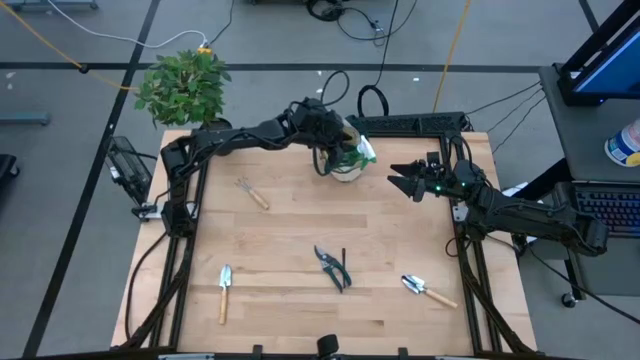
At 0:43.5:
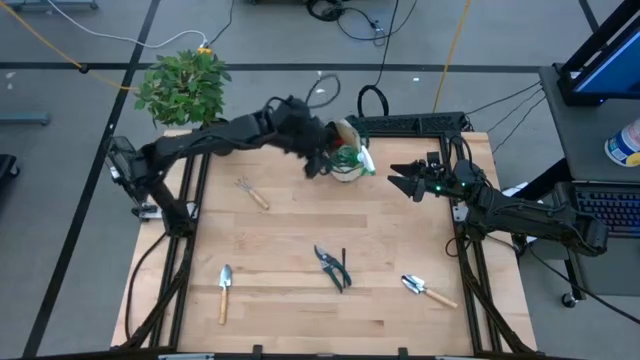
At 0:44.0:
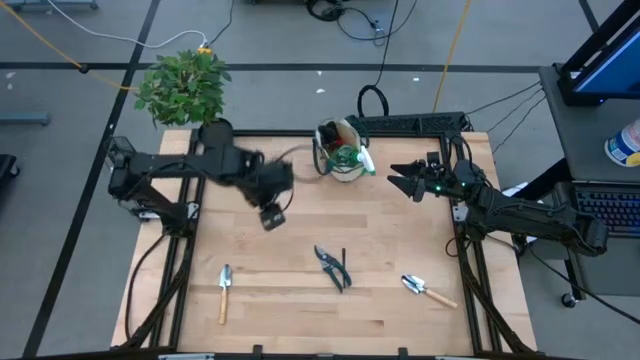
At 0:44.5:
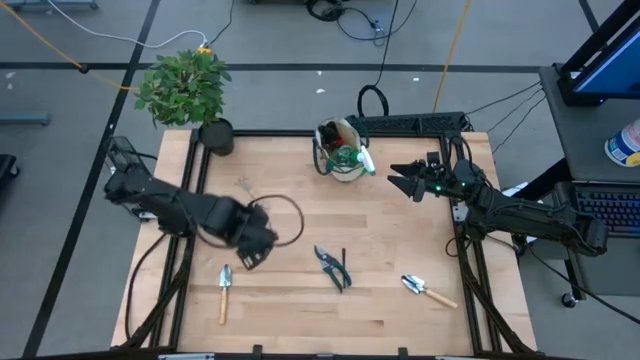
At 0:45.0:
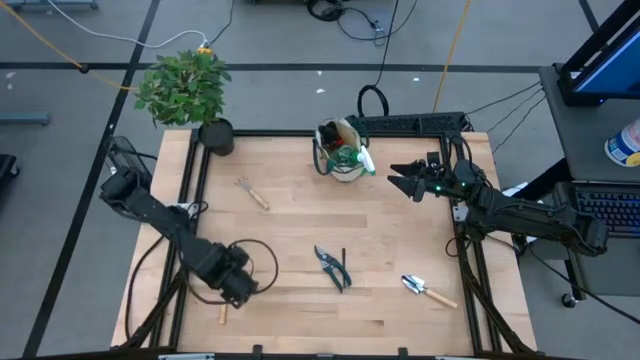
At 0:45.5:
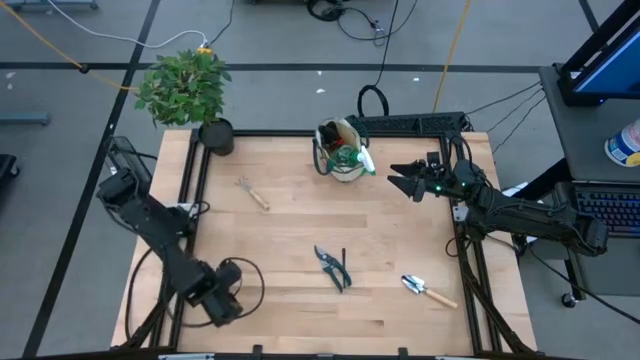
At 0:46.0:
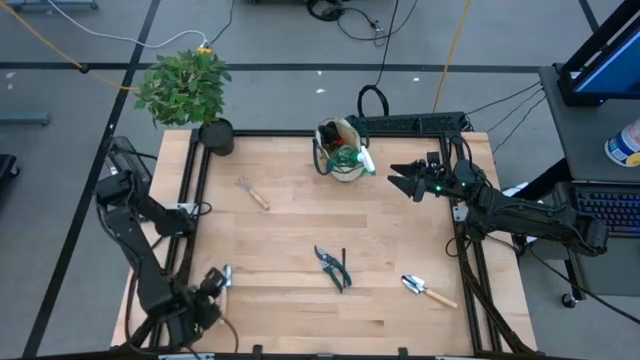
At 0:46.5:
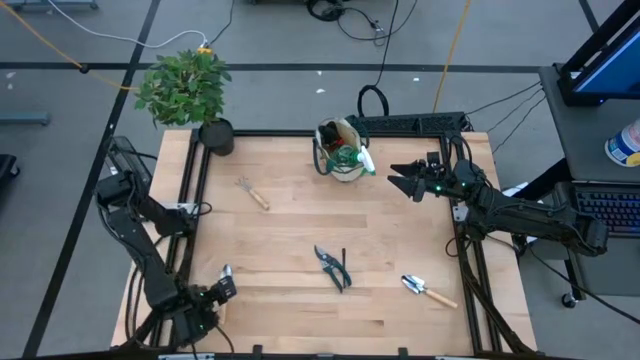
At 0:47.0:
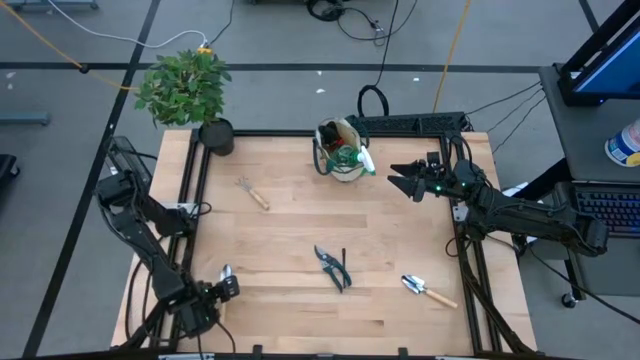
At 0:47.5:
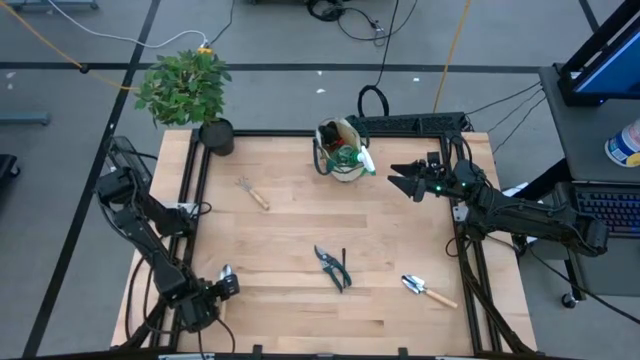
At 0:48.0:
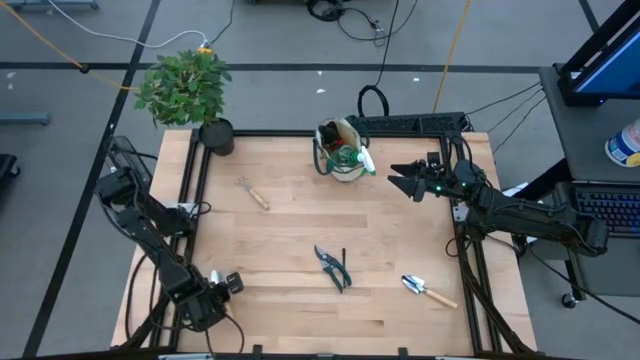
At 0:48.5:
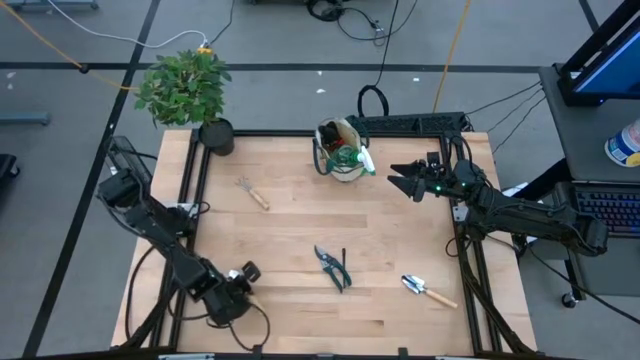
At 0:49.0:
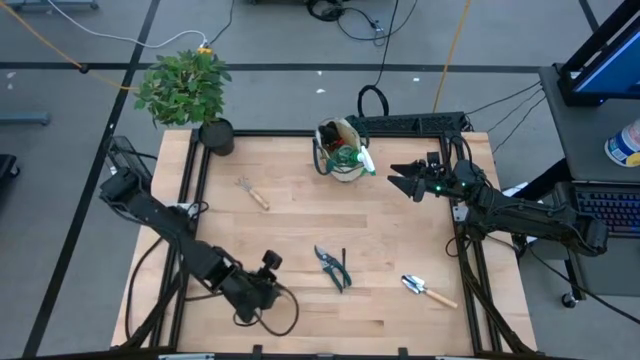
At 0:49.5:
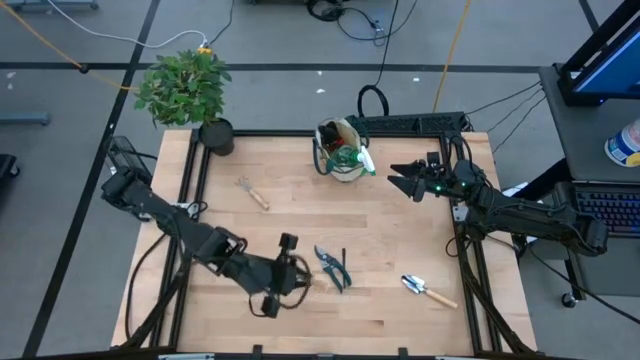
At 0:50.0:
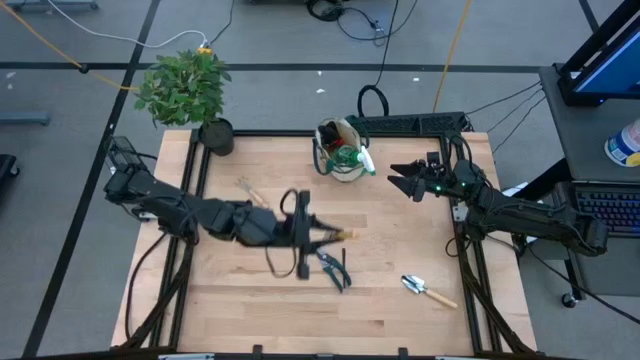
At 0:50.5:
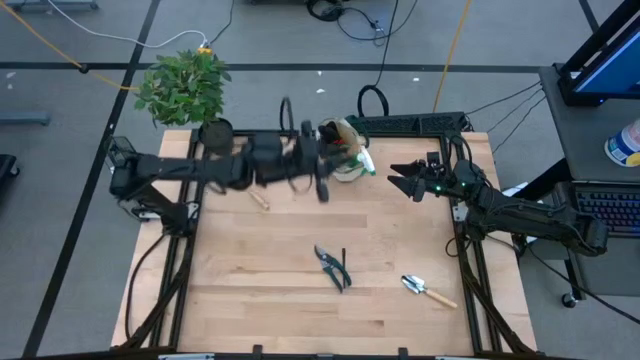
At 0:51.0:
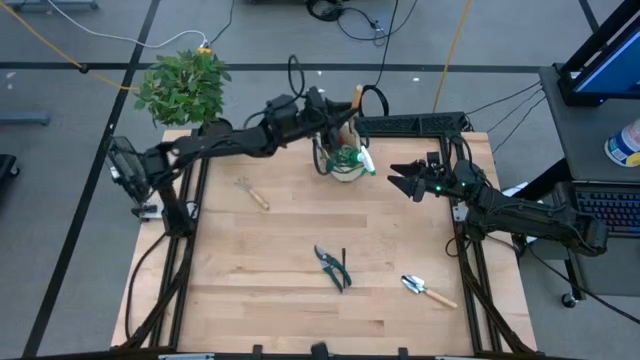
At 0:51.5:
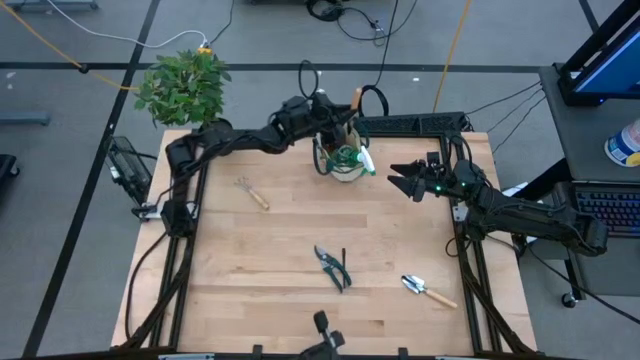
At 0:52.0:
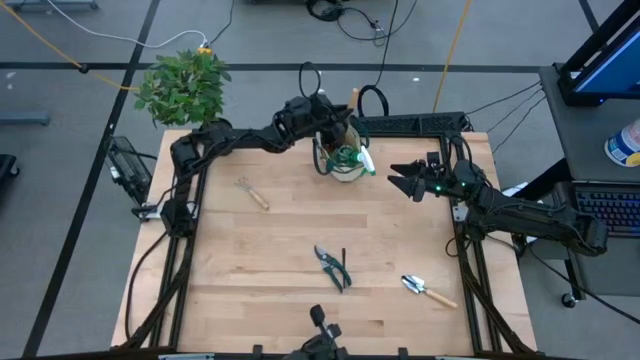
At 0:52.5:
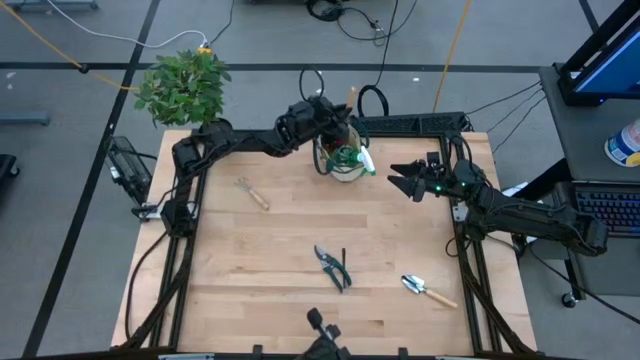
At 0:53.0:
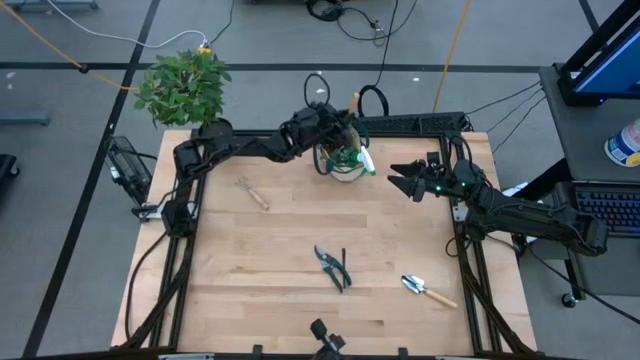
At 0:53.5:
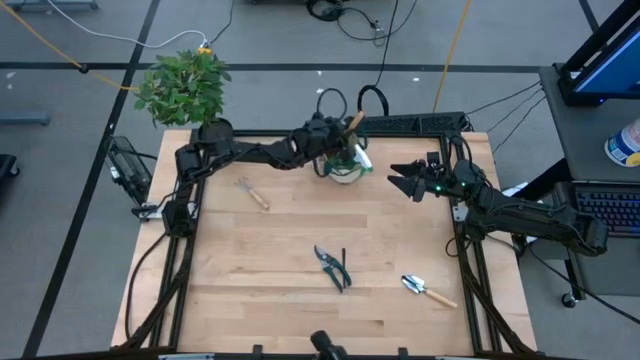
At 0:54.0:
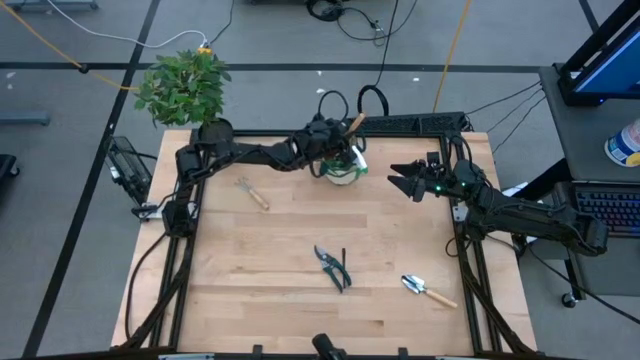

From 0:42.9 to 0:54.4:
Task: Pick & Place Garden tools in Gardening bag
Put the left trowel into the gardening bag
